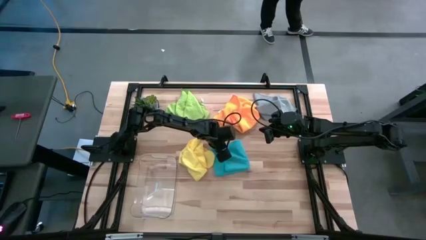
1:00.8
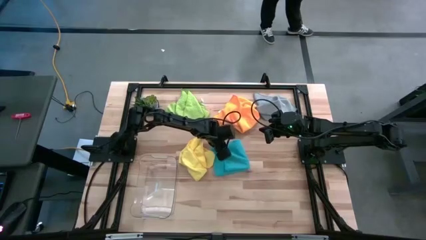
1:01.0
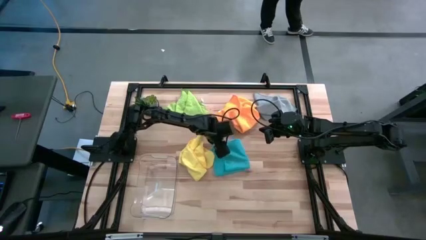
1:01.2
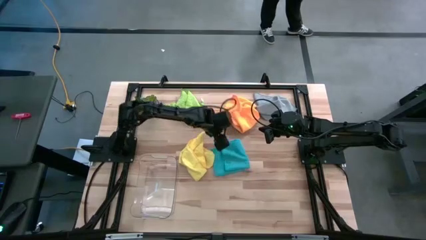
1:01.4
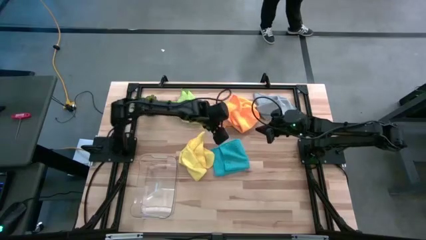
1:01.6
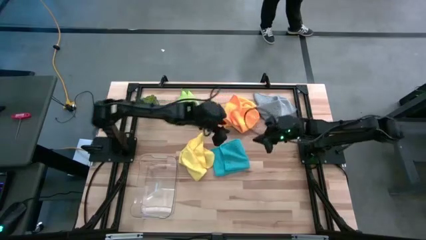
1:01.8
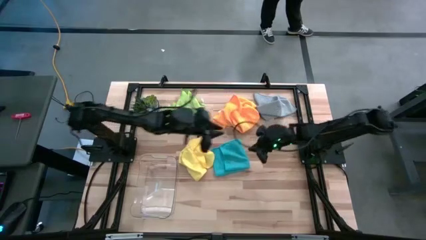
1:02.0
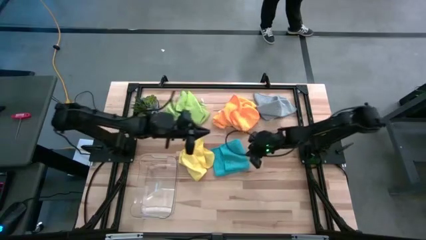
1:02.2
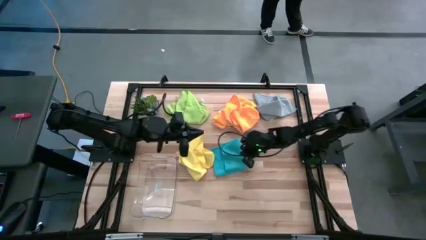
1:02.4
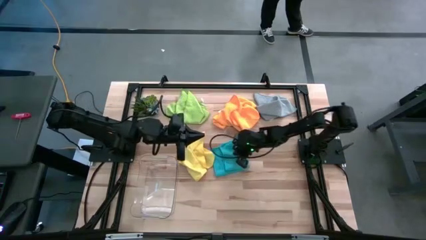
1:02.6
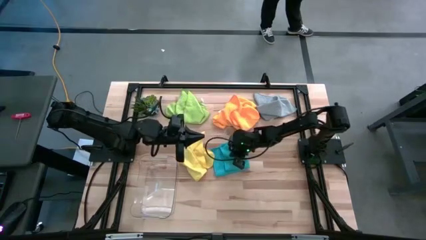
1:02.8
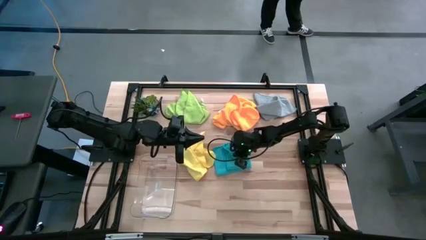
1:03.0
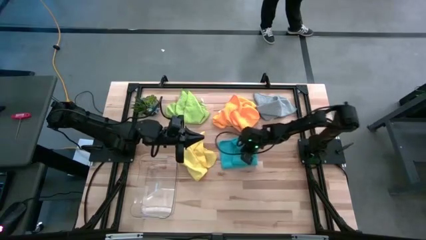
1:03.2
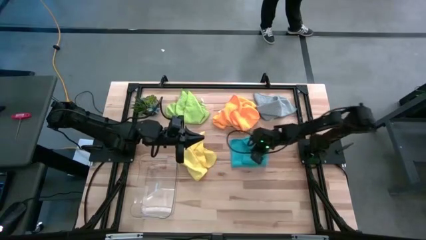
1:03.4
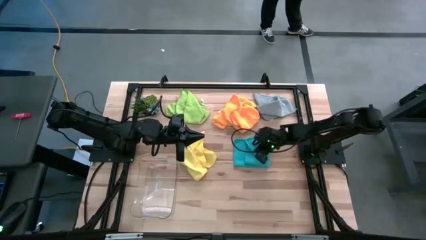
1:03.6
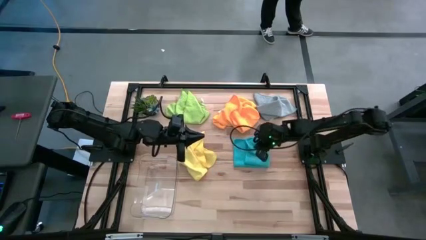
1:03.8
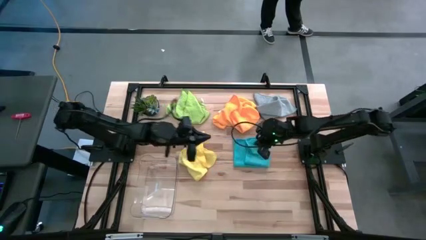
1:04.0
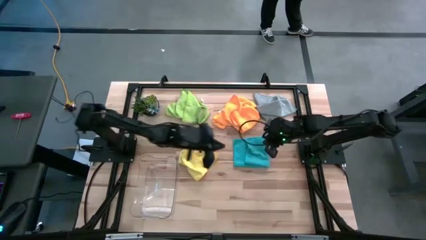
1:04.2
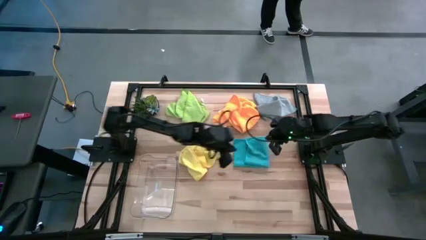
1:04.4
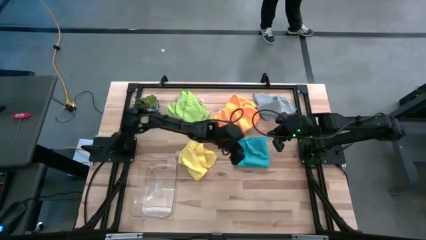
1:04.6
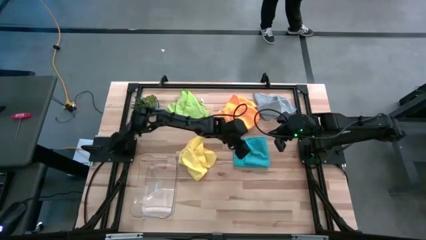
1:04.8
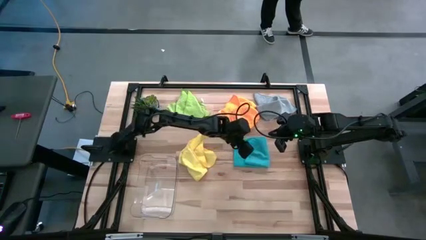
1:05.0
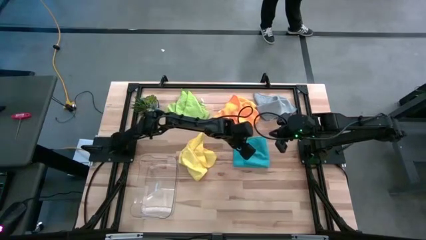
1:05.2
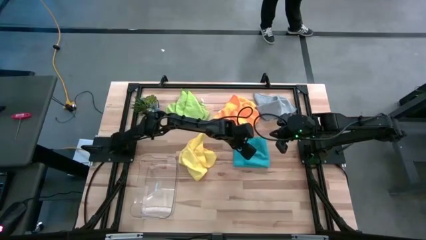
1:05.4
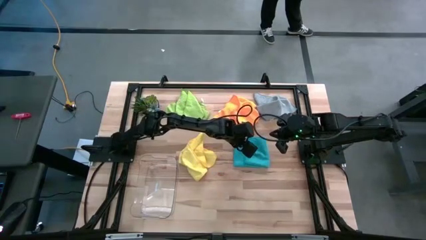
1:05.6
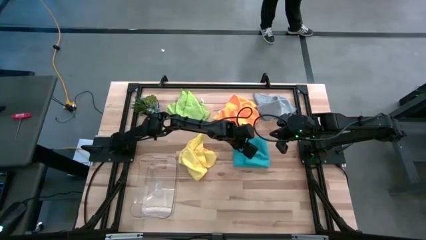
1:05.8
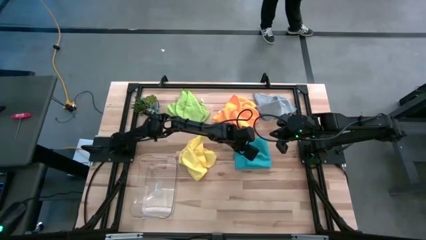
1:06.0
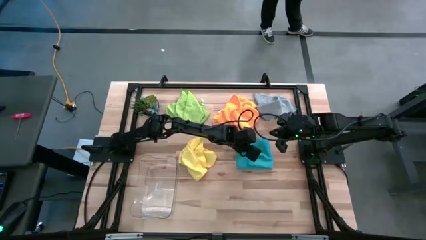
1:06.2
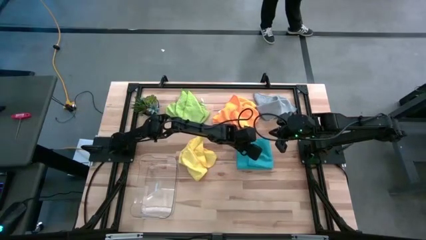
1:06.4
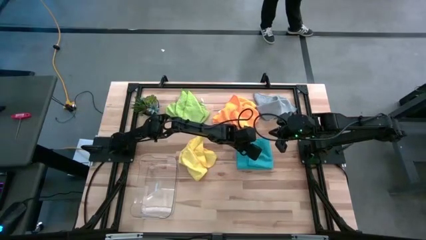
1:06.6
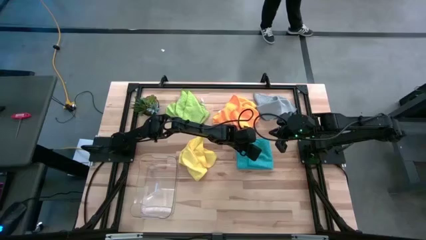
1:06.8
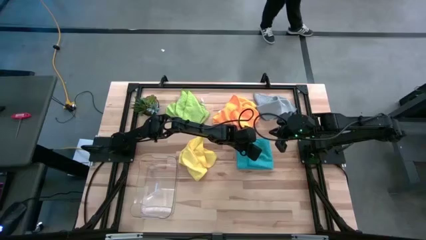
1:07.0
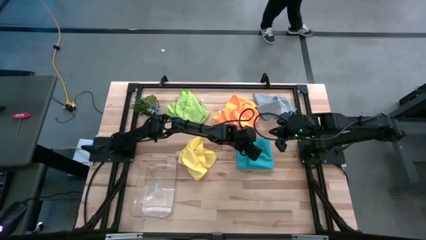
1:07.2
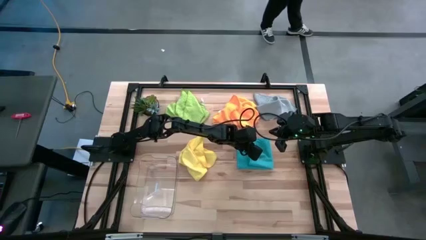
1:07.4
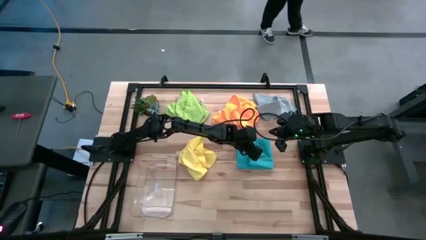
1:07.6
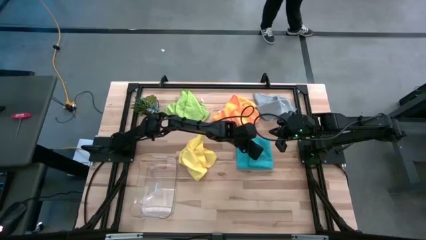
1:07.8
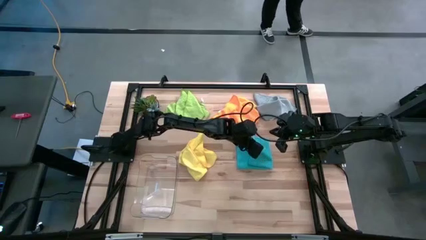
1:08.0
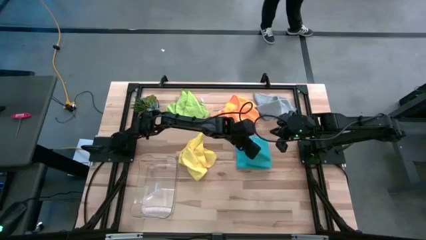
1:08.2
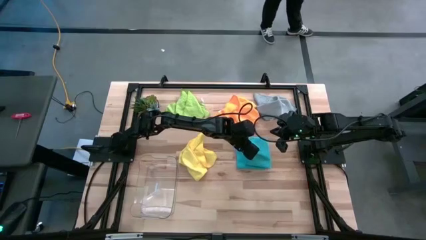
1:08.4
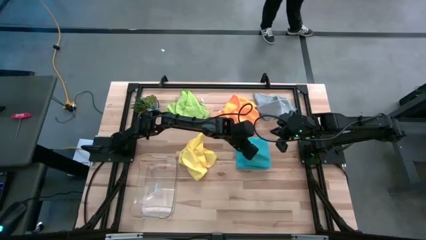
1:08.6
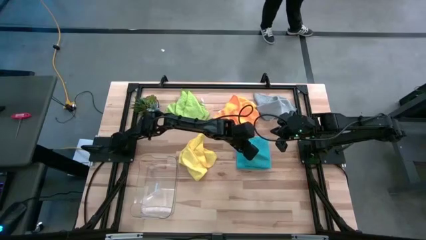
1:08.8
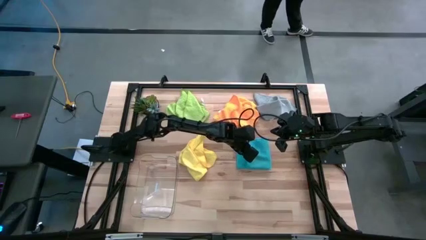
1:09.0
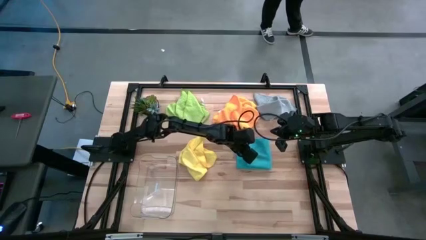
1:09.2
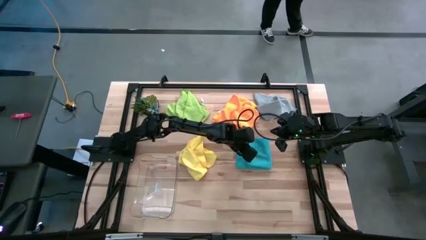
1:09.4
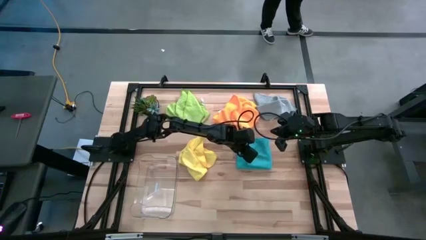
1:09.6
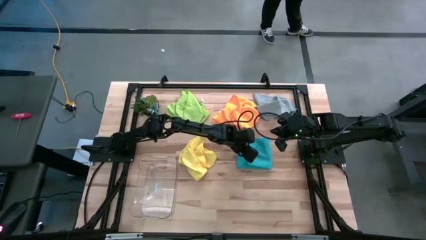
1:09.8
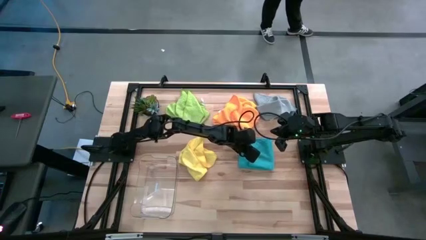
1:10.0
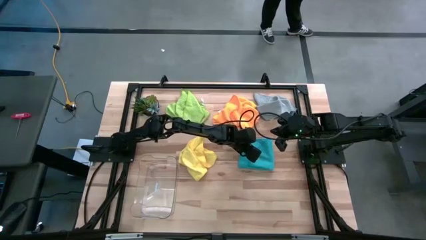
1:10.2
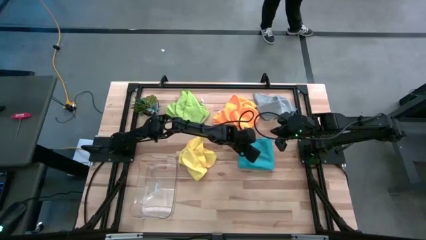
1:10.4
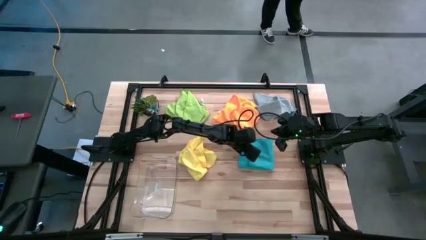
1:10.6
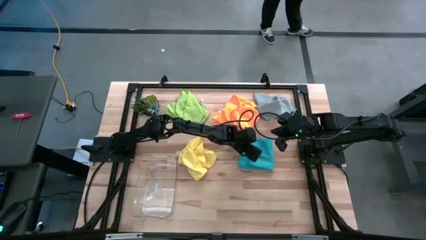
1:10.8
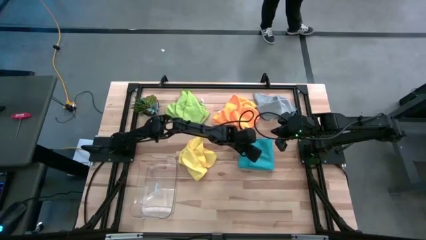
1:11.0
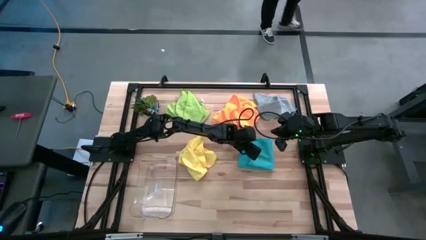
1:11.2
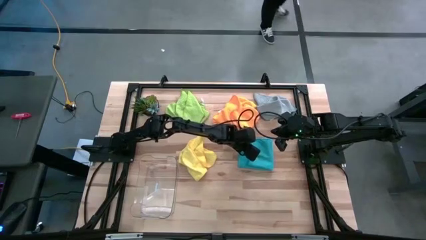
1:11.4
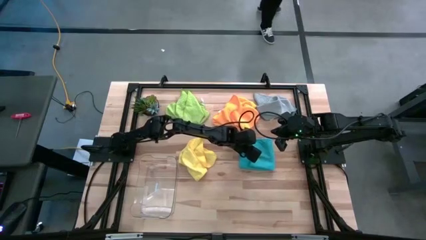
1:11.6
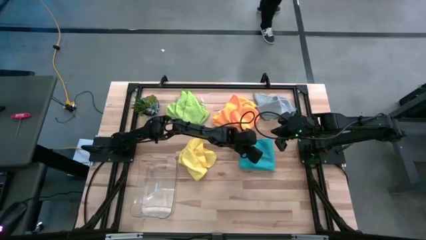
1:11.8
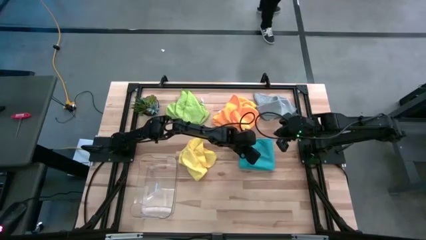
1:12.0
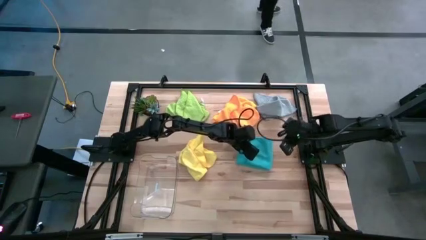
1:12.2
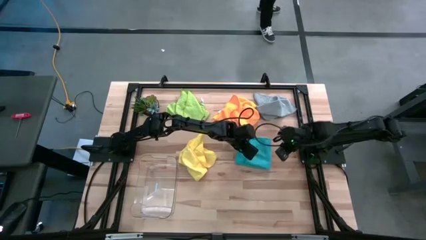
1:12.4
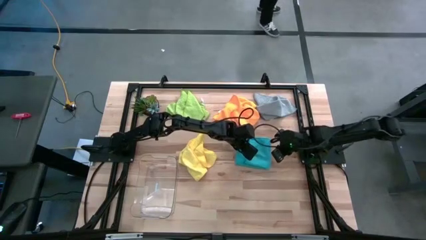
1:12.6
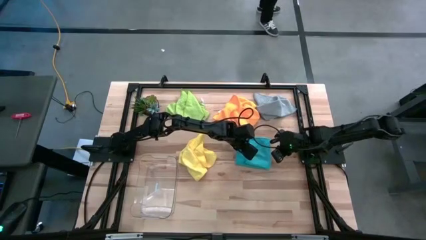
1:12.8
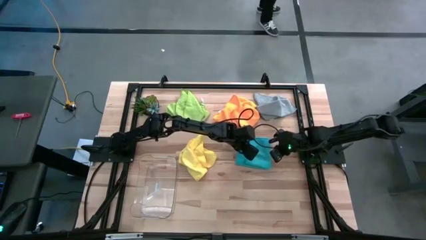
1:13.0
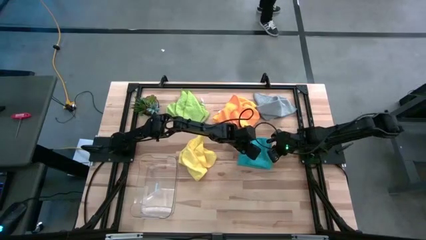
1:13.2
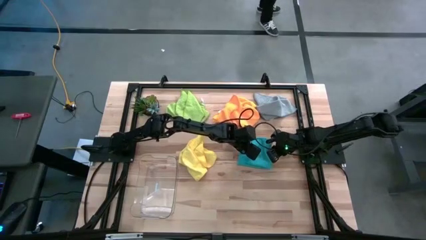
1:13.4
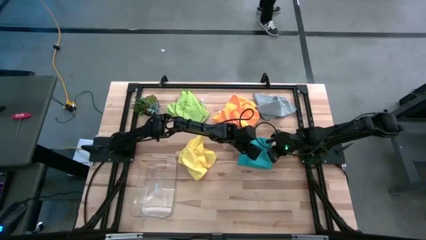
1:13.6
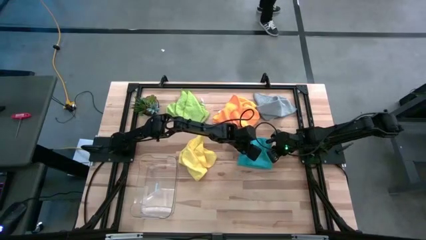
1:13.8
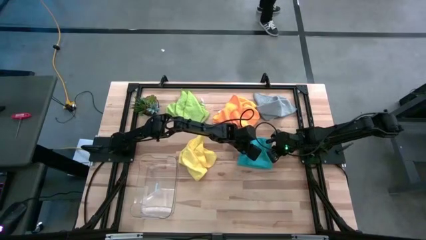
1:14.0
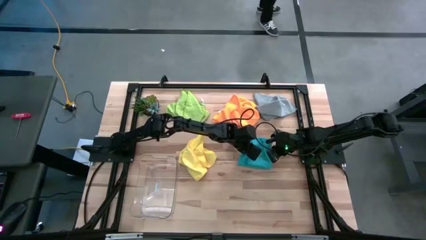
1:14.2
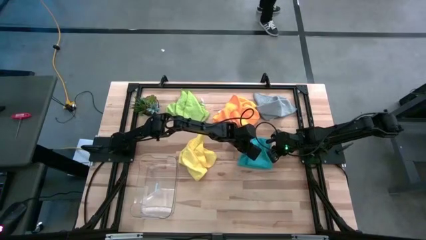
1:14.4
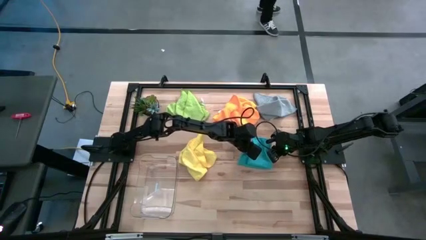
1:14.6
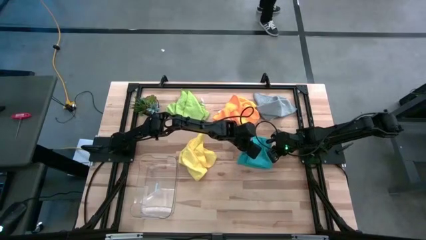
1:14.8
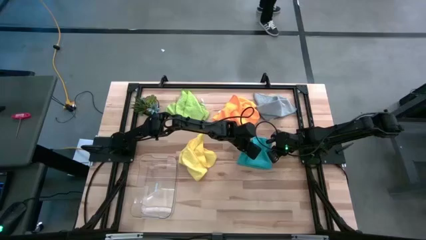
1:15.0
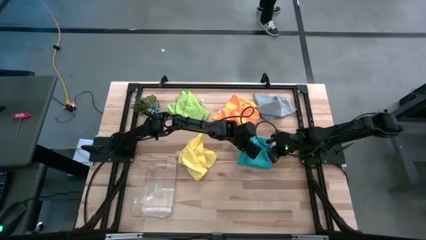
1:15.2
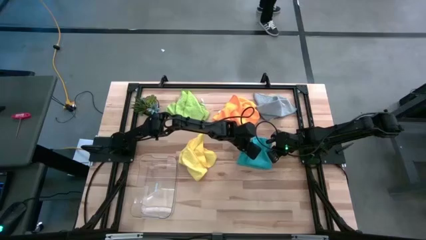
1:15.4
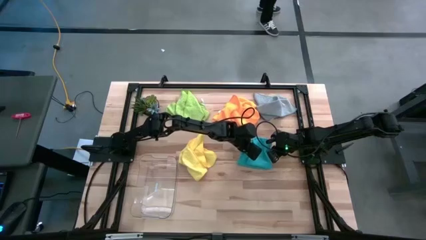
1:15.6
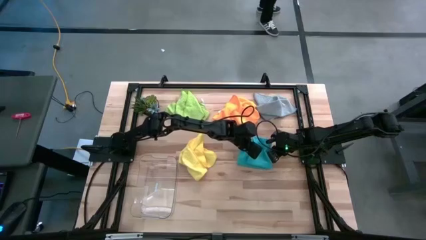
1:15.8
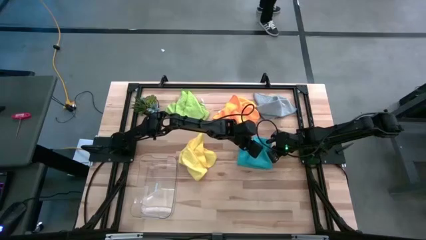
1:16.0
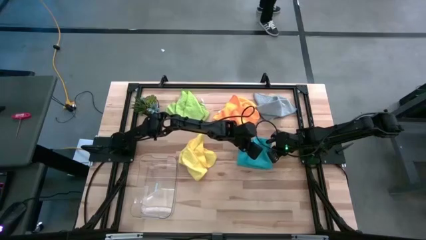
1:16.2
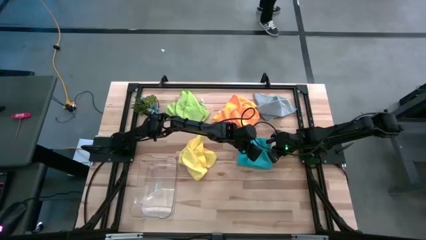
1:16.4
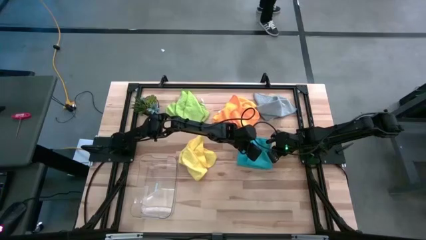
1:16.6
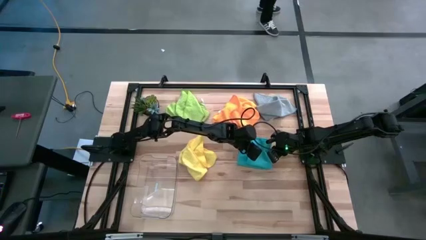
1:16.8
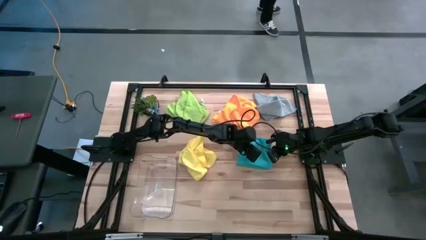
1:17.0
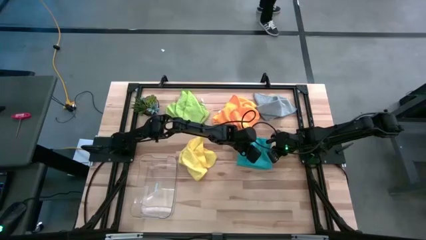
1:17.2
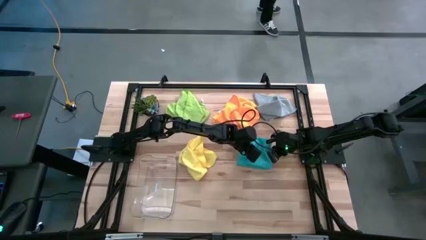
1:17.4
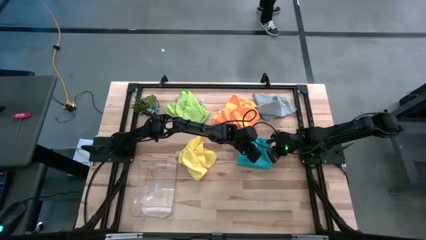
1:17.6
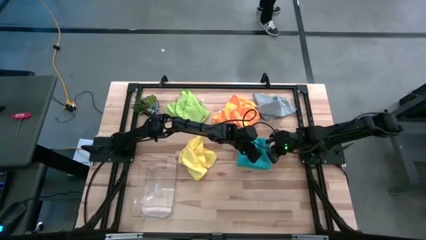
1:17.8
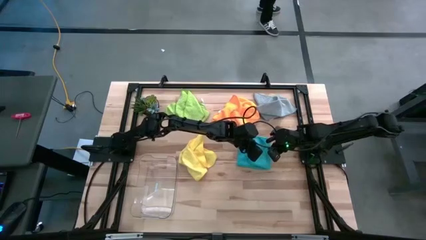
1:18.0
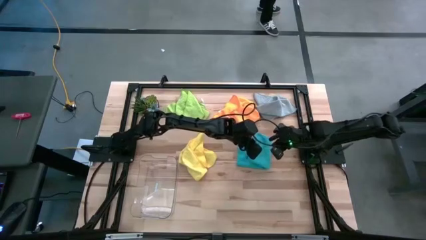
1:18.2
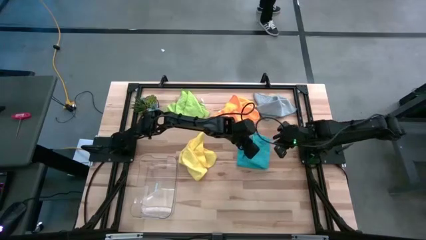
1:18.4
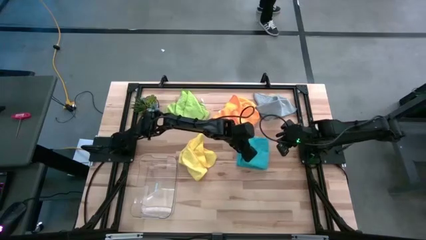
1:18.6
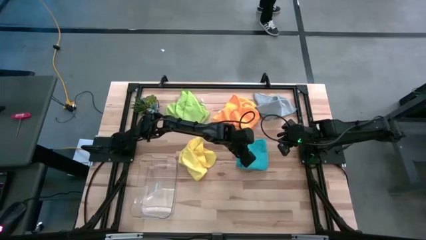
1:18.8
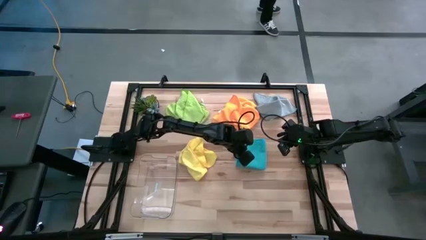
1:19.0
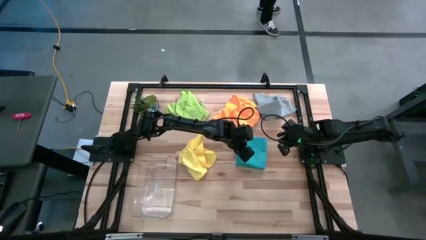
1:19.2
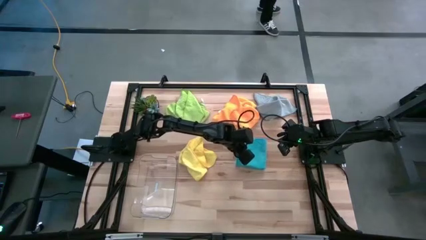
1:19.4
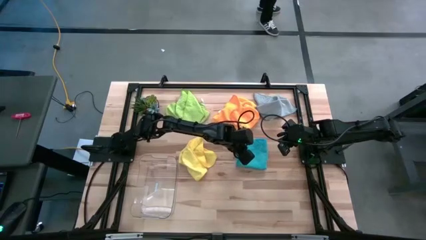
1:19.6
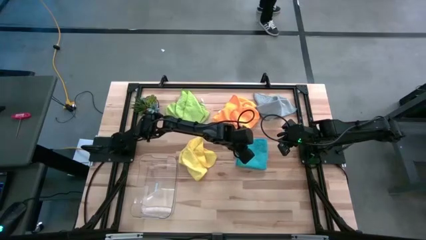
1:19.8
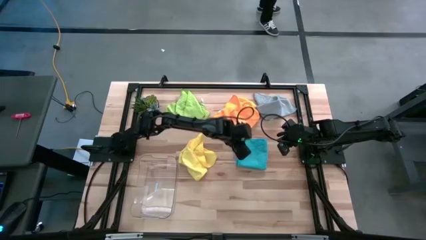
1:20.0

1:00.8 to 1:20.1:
Task: Fold microfiber towels
Fold the blue towel
